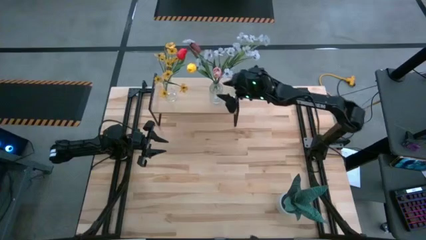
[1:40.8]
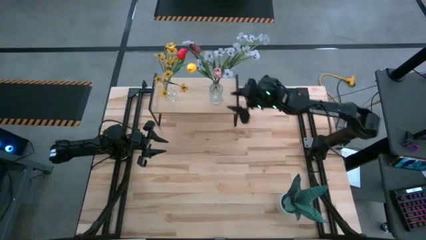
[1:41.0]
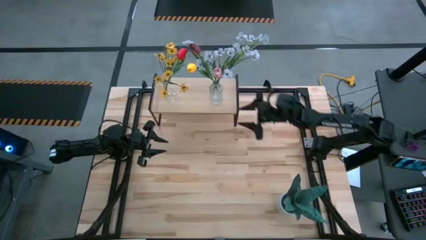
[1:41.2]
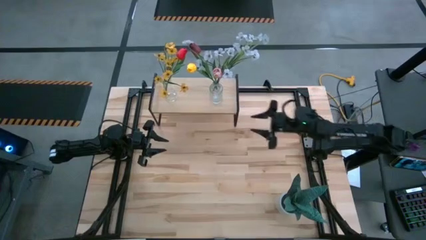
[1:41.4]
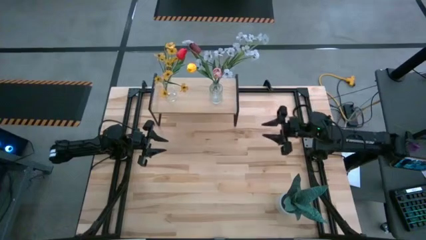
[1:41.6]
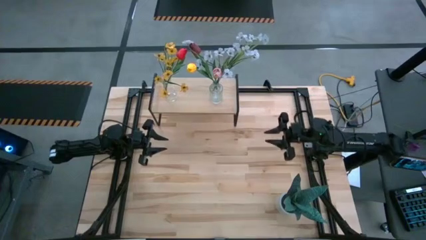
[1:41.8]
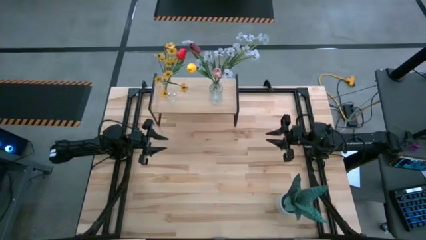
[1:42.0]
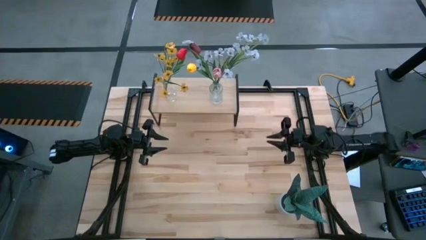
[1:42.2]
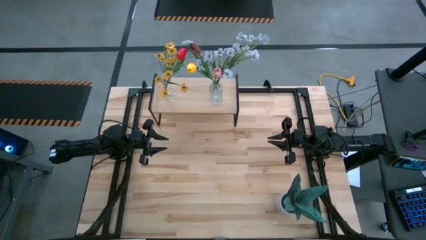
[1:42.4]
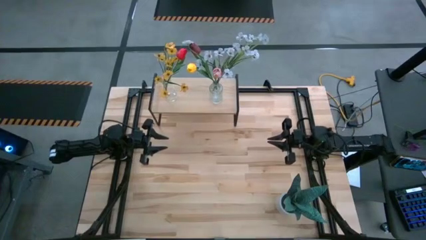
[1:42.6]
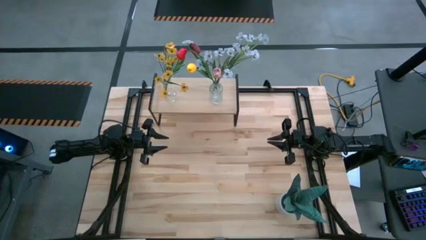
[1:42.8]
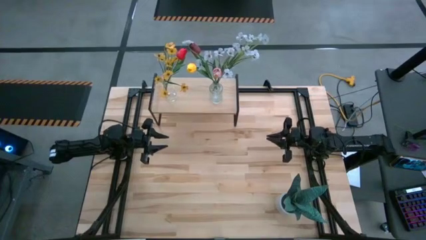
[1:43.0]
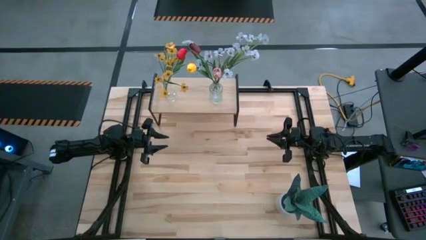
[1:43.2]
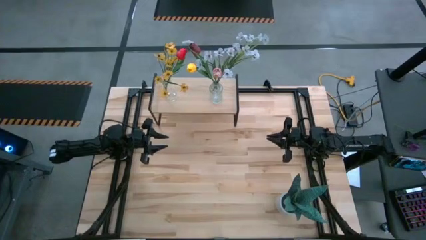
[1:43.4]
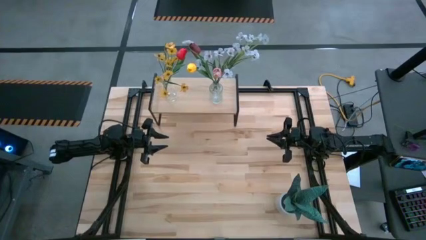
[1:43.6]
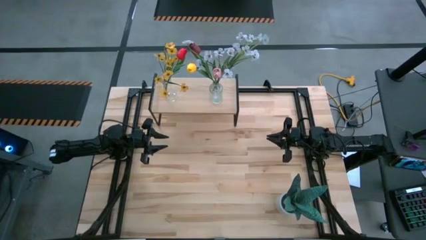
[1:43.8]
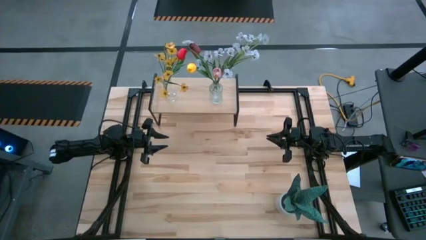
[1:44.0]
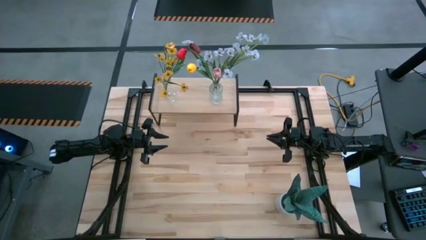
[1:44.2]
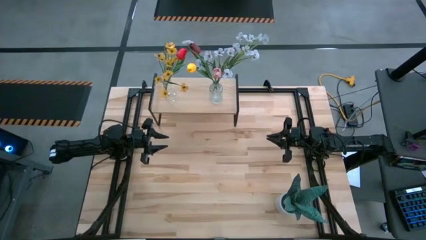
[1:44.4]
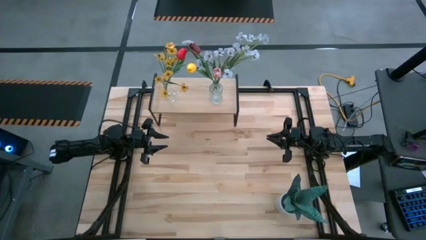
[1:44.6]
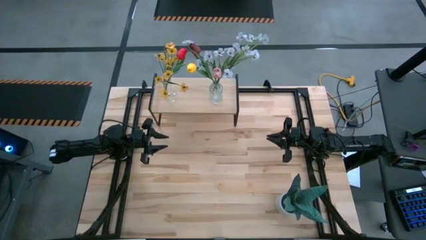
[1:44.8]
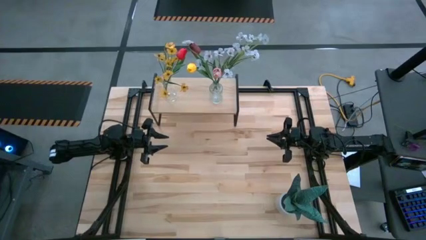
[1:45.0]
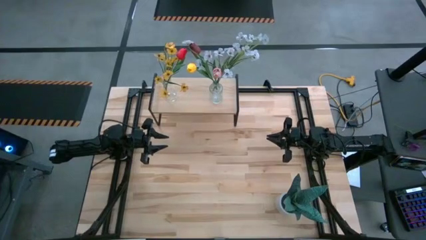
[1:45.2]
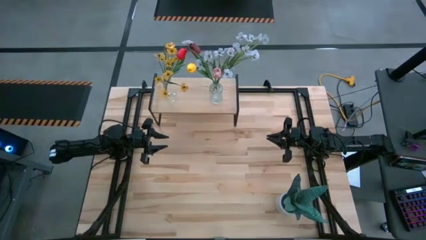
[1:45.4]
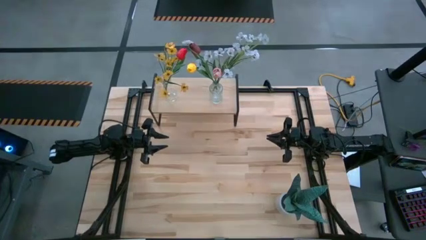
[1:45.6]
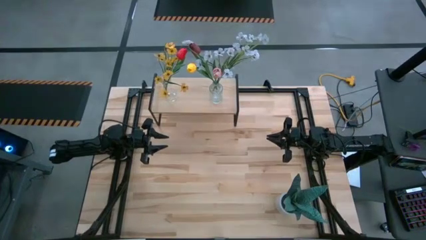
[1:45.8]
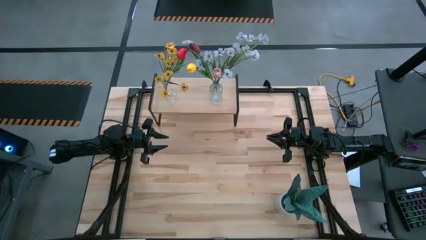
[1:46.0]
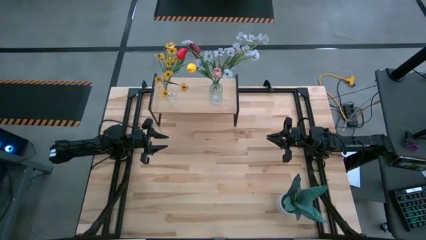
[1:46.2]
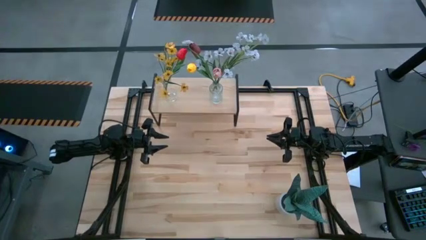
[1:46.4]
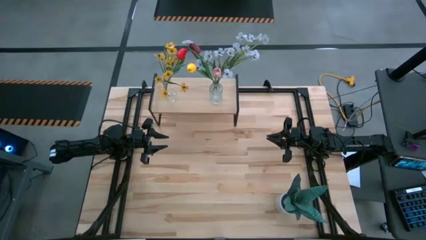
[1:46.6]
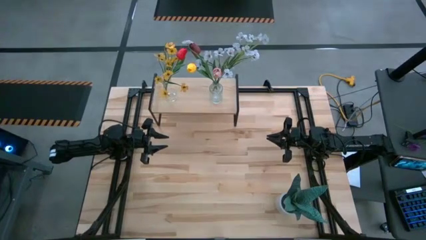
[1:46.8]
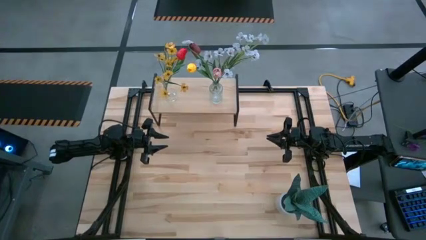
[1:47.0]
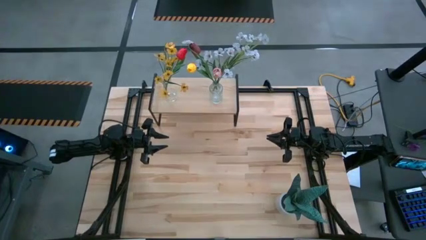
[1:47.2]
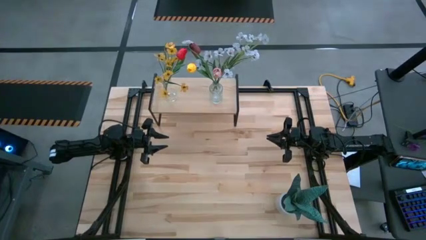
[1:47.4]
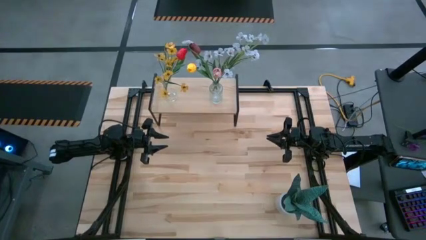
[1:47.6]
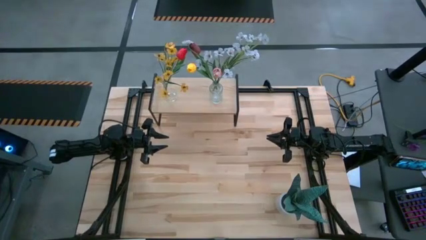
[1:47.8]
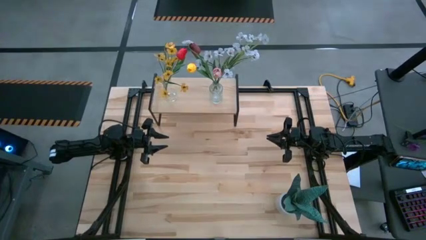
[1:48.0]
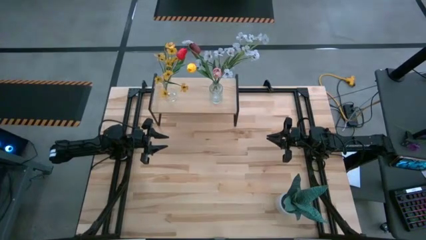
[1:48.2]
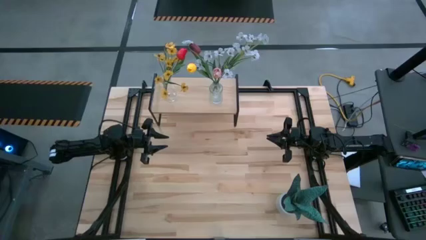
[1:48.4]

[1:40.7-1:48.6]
Task: Pick and place flowers into a vace then onto a shelf
Return to Home Position

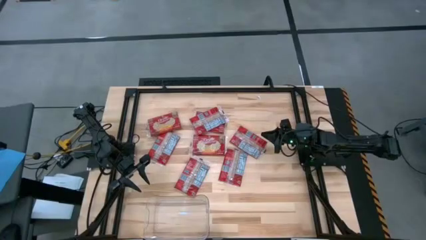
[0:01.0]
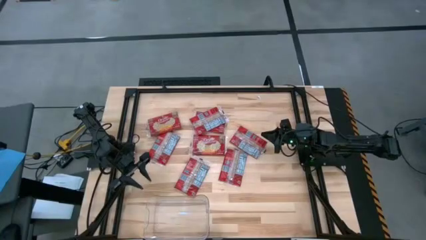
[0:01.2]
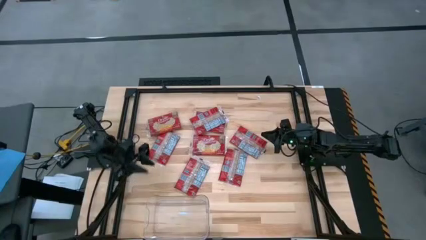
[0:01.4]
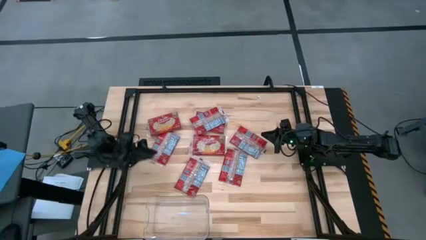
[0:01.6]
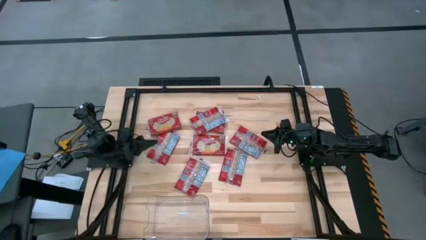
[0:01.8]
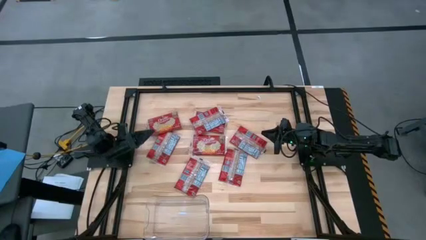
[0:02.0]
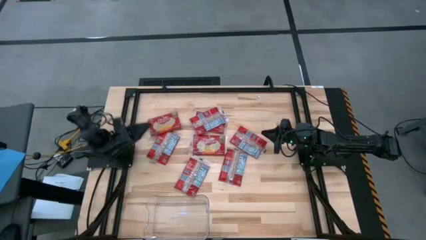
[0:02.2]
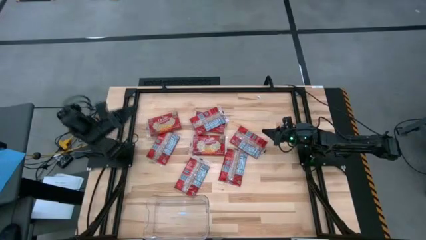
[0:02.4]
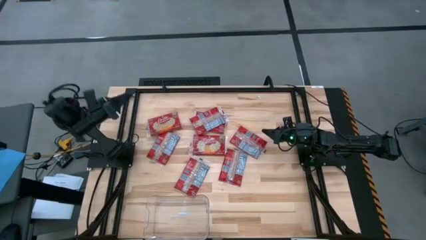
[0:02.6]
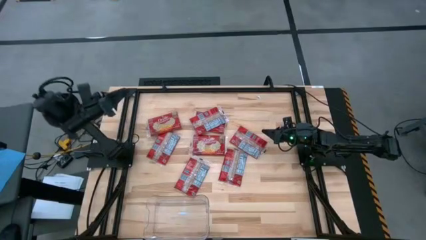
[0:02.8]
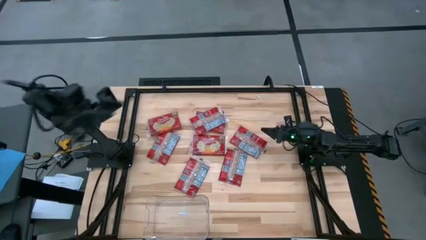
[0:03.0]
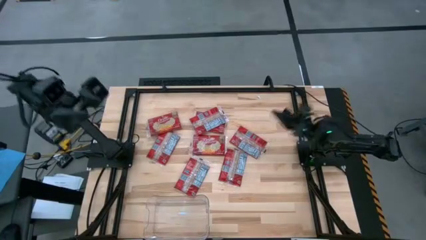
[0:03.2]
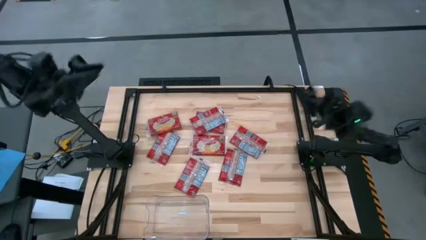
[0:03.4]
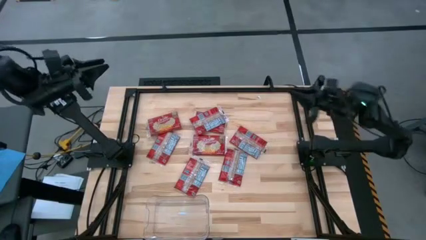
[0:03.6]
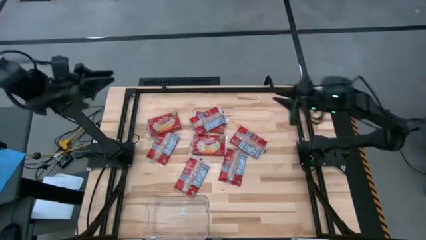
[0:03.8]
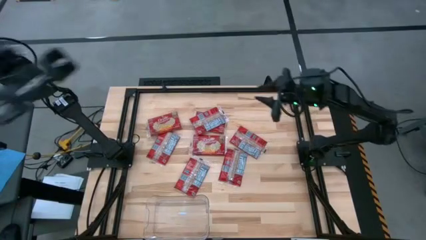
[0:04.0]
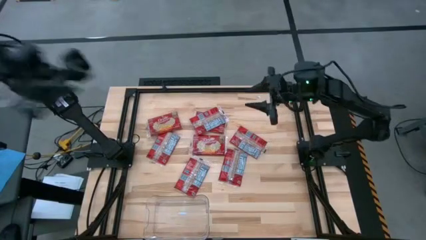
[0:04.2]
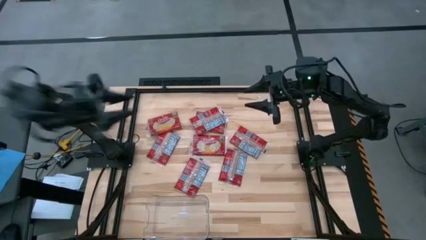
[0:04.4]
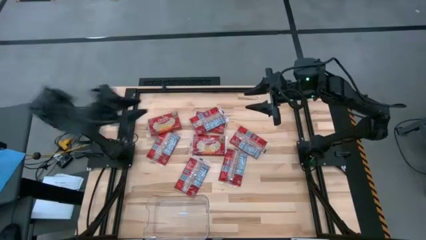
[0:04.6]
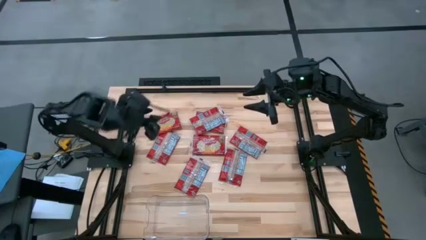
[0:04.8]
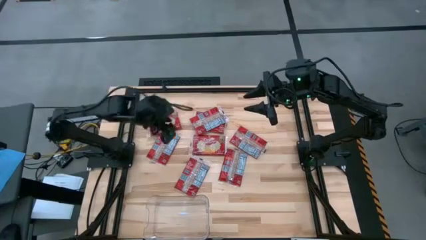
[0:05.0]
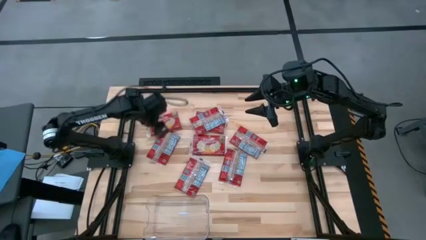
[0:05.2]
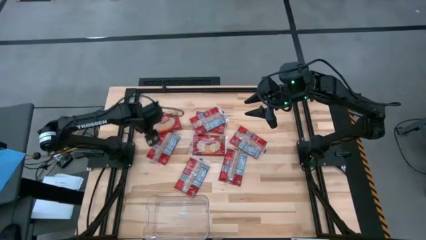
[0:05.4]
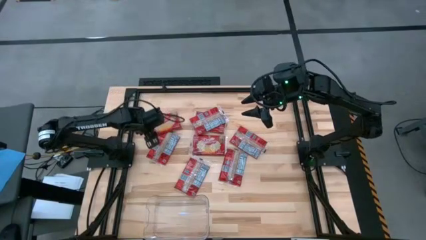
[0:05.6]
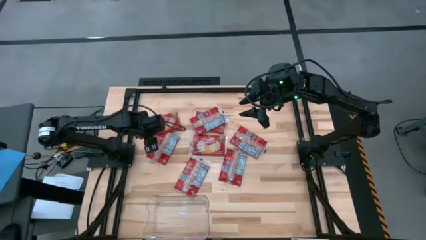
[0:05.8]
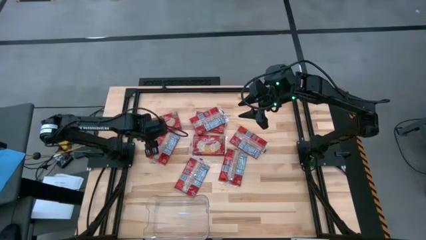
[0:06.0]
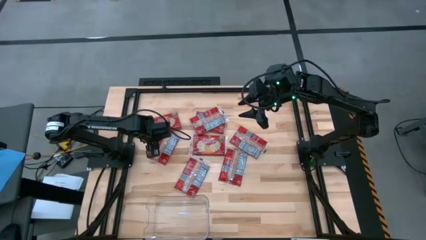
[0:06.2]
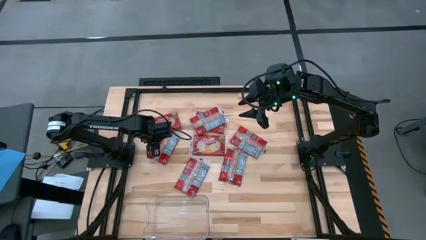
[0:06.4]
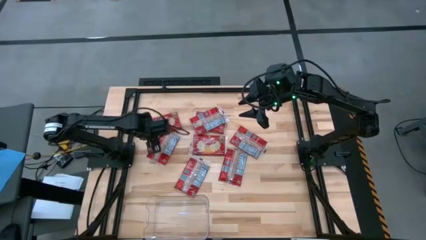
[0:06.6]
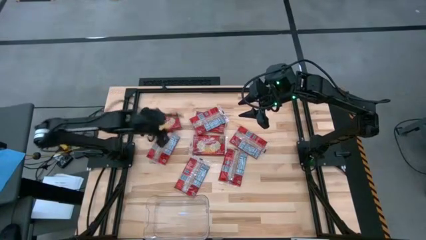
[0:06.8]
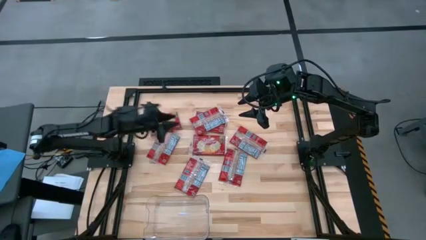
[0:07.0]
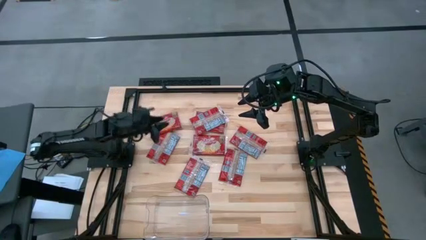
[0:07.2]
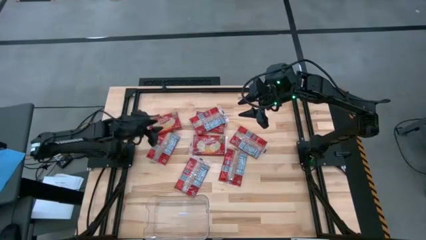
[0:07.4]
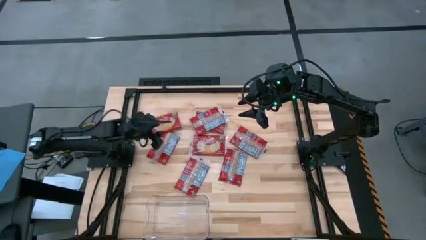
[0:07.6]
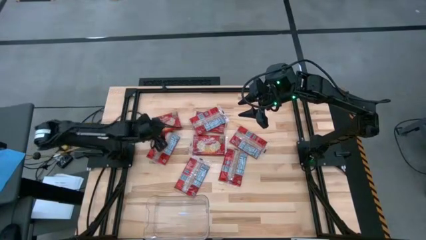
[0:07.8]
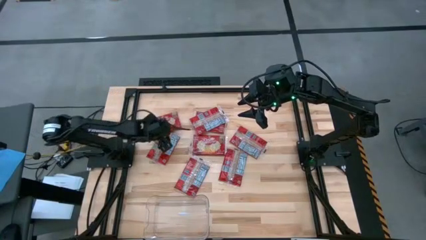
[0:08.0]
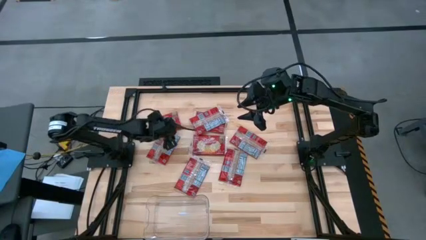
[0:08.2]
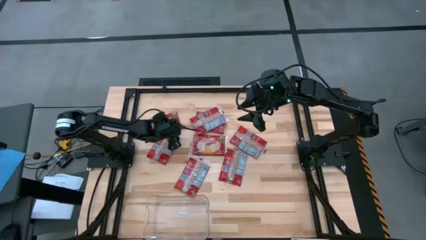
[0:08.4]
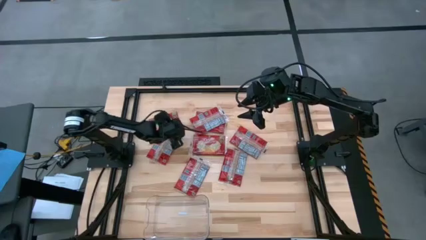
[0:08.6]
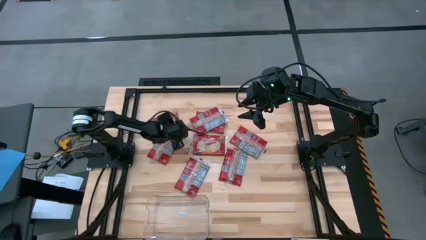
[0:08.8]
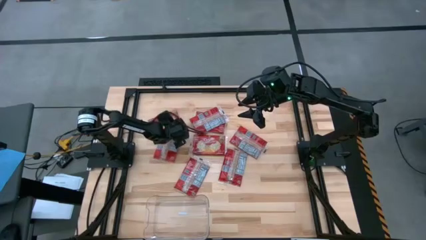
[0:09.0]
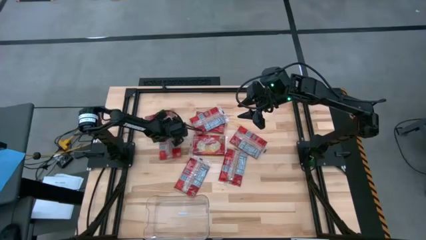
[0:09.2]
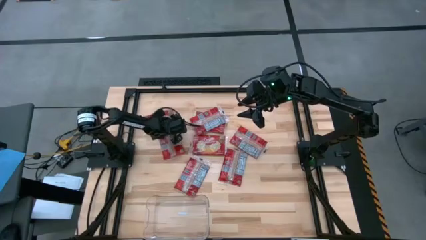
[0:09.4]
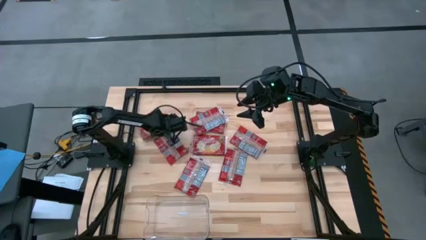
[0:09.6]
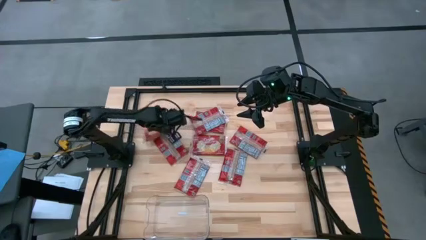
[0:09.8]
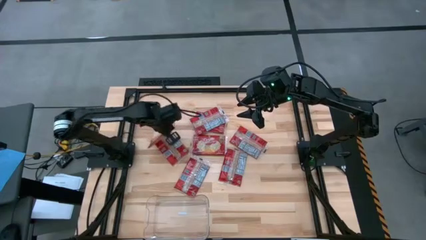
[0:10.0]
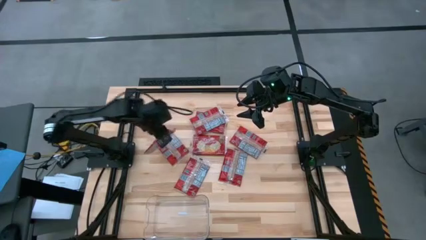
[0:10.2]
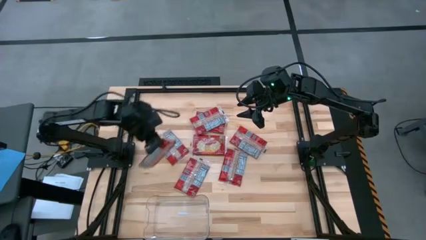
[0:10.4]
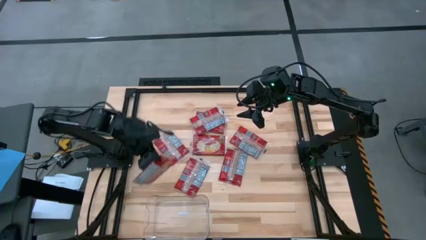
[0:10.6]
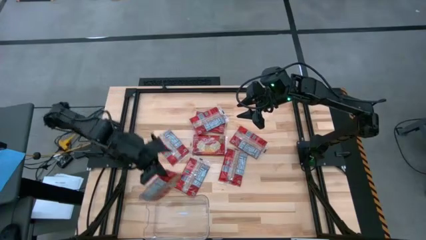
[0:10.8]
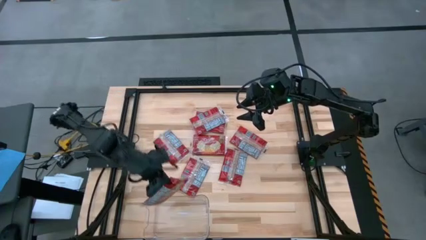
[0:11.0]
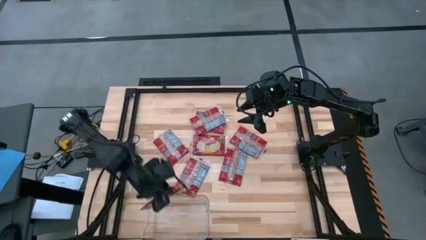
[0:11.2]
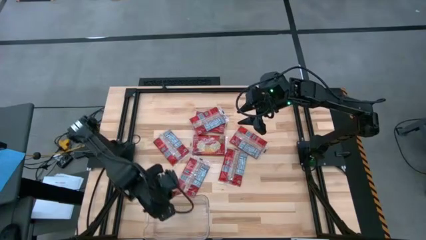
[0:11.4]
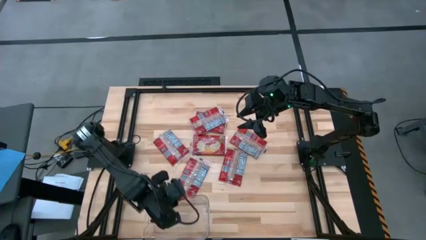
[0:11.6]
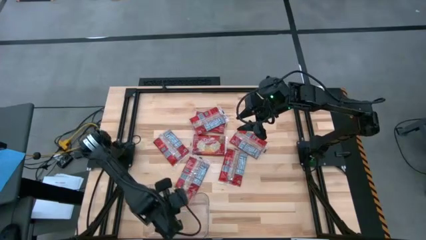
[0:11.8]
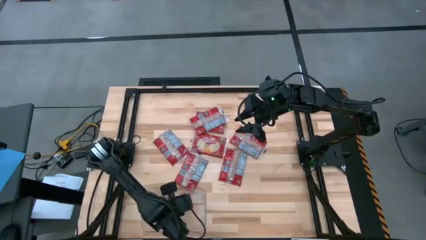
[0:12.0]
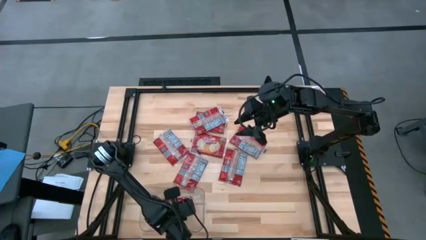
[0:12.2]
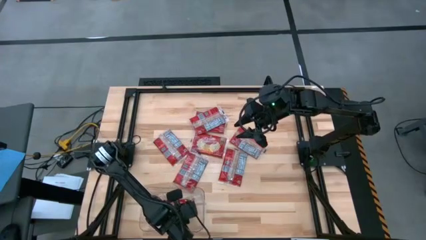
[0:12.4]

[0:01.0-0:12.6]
Task: Sort popcorn bags into baskets
Put the red popcorn bag into the transparent bin
